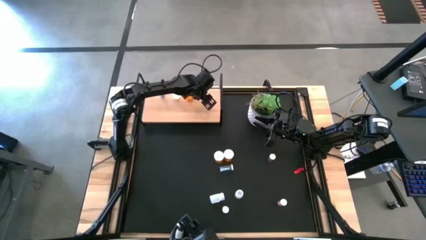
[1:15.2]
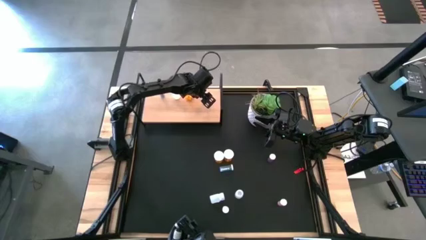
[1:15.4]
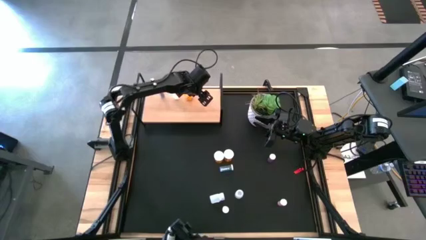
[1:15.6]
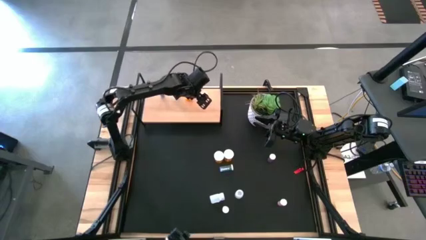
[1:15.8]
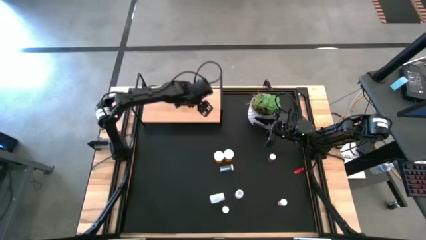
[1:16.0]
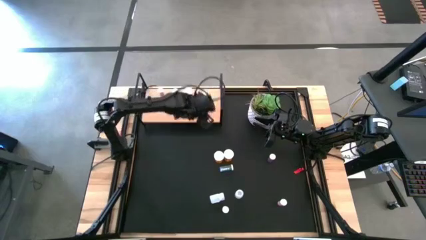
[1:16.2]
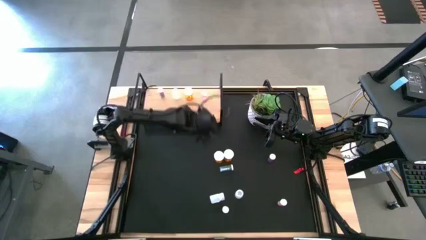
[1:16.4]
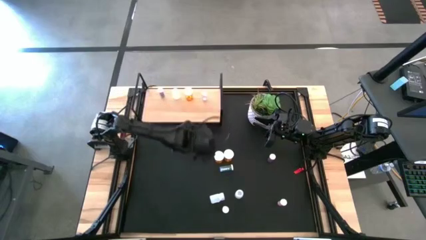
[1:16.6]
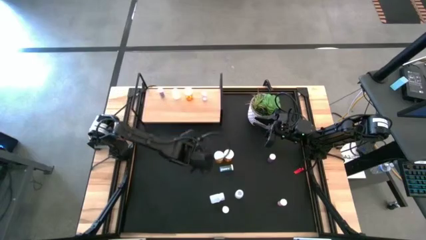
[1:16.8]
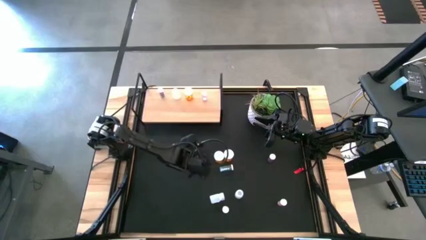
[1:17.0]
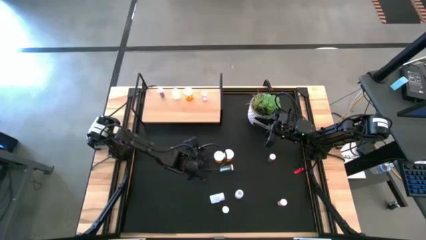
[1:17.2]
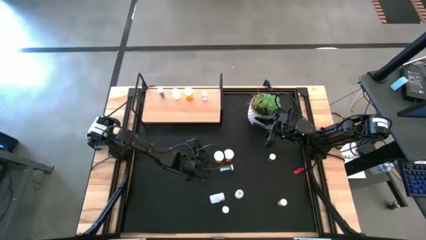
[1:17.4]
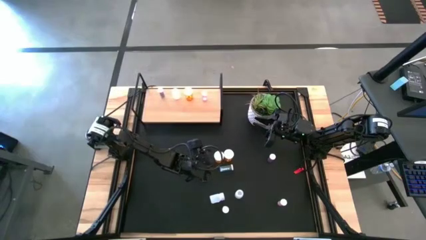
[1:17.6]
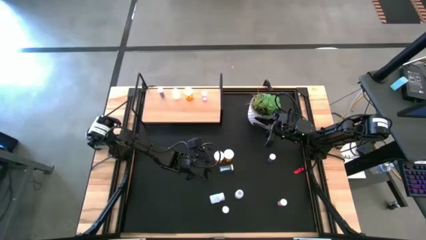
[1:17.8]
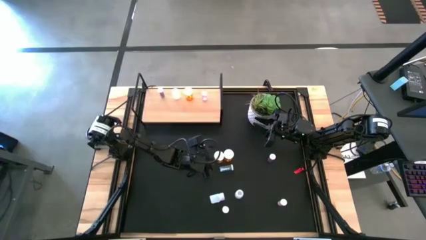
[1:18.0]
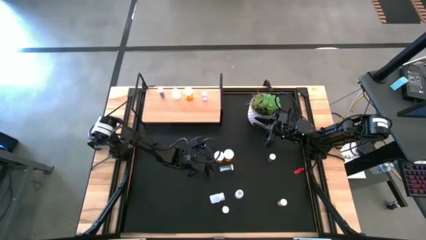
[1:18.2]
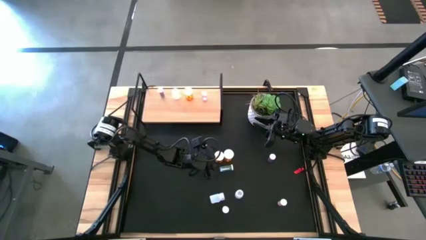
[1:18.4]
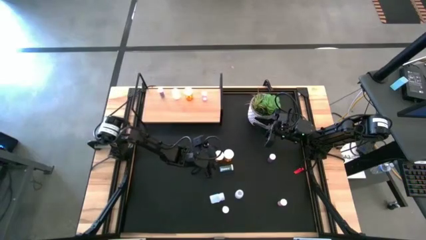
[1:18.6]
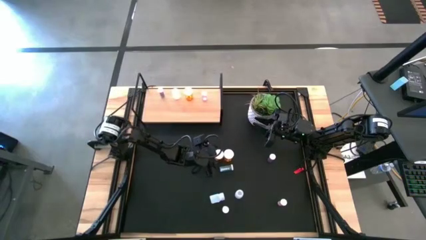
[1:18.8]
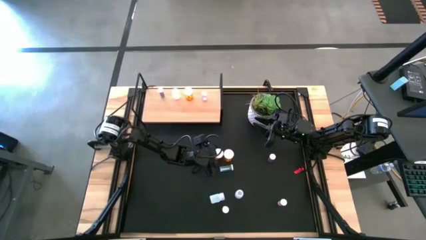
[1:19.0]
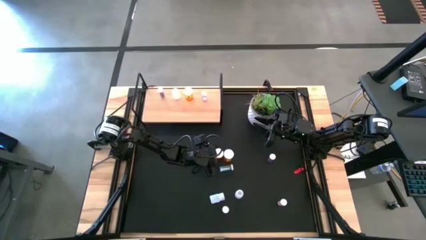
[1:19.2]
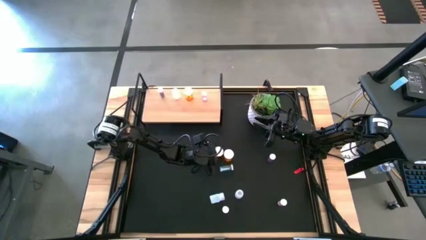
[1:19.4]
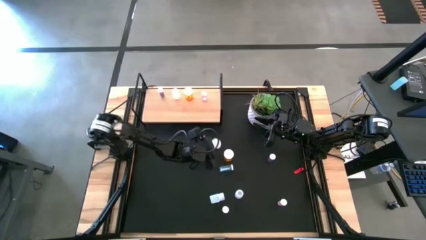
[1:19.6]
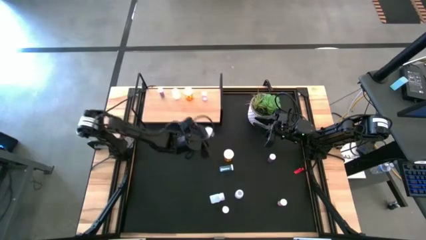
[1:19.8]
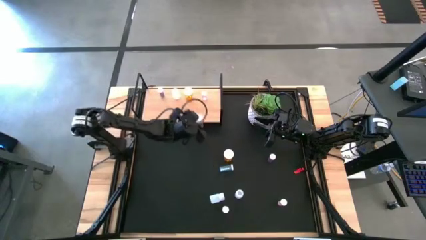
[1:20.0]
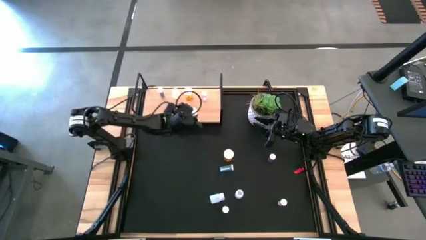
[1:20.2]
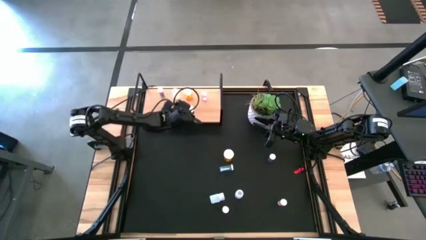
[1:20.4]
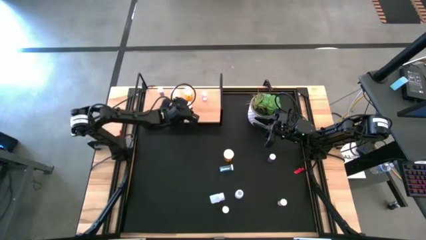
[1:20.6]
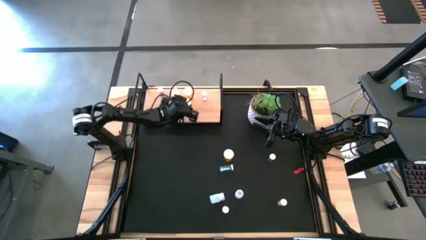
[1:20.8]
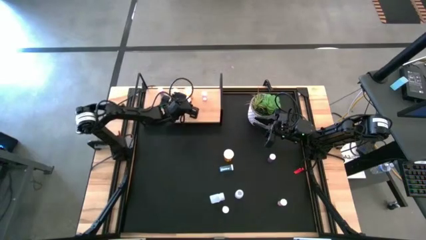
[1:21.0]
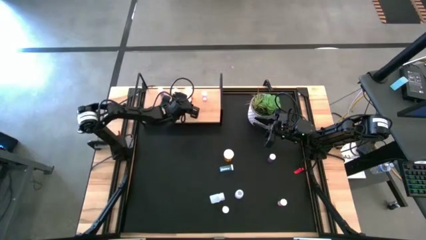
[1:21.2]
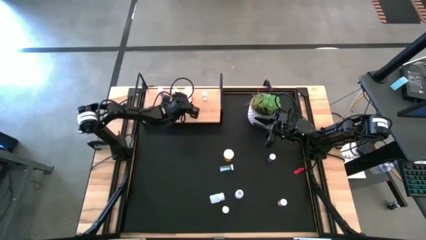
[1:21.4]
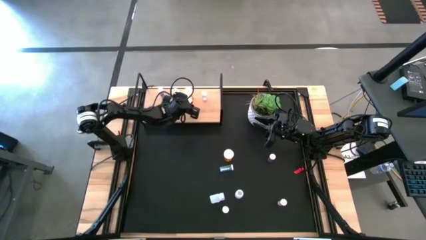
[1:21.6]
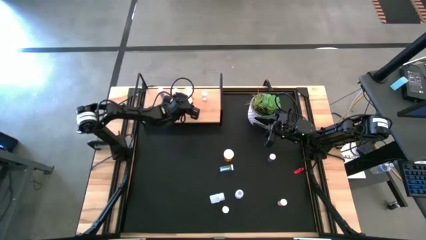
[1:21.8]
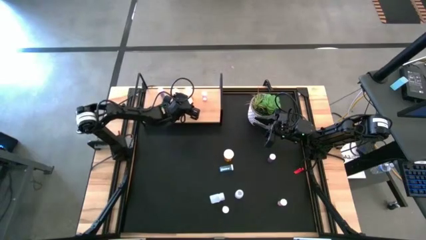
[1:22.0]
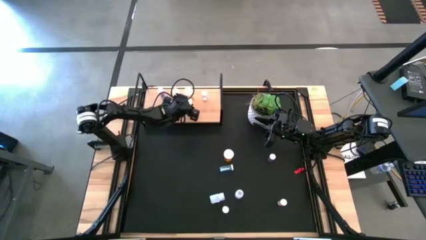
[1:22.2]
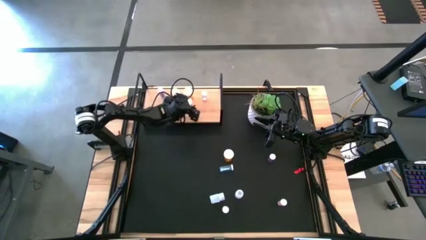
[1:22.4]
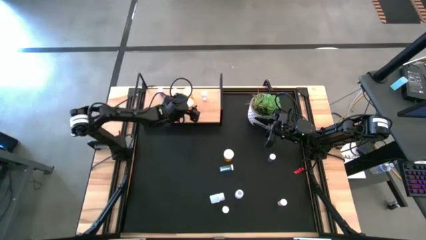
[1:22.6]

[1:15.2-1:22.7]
Task: Pick and place medicine bottles onto shelf by color
Put the top left orange pill bottle on the shelf aligned with the other orange pill bottle

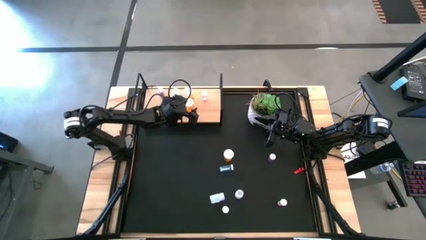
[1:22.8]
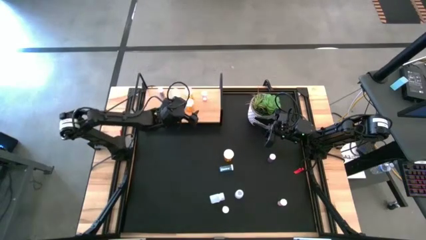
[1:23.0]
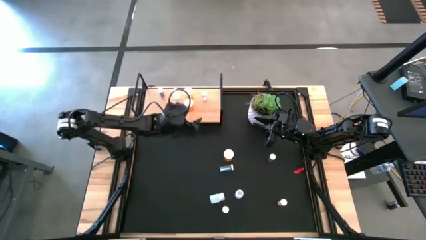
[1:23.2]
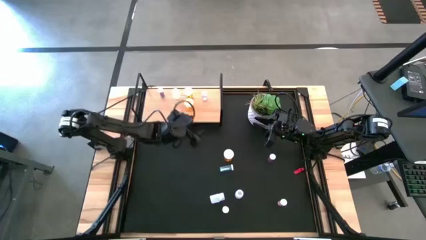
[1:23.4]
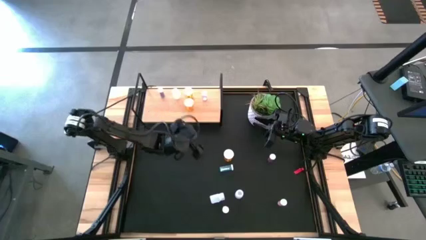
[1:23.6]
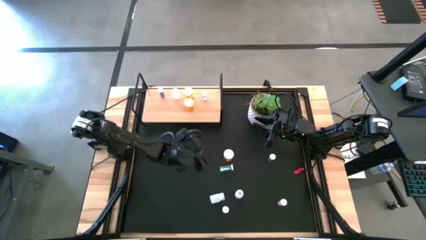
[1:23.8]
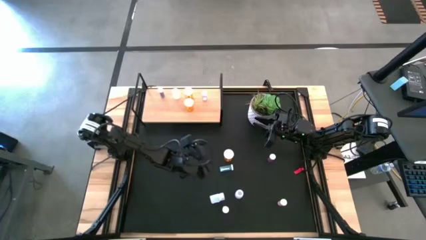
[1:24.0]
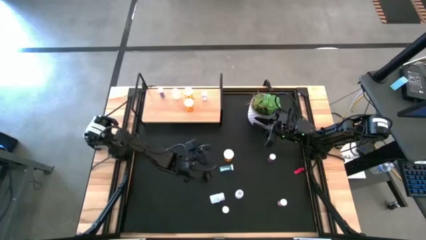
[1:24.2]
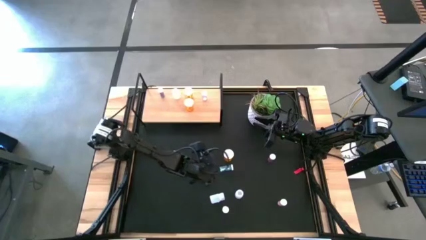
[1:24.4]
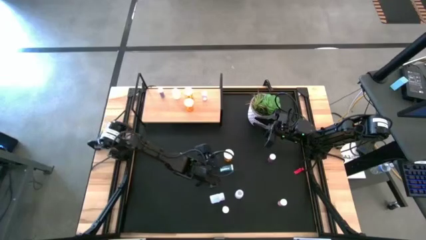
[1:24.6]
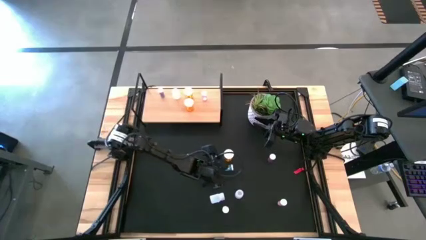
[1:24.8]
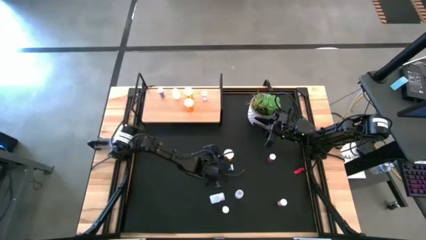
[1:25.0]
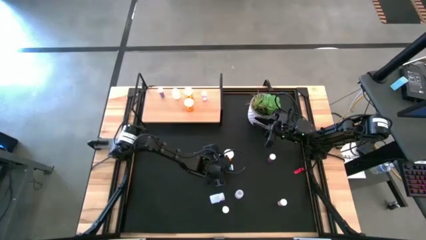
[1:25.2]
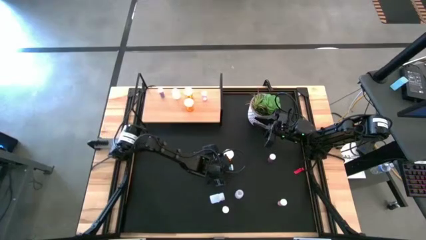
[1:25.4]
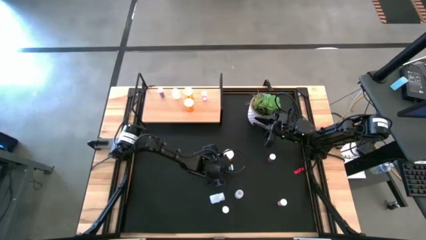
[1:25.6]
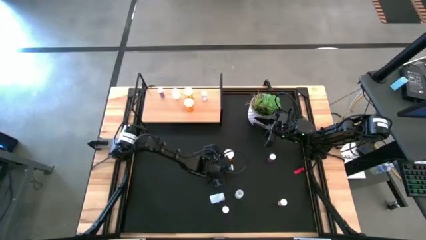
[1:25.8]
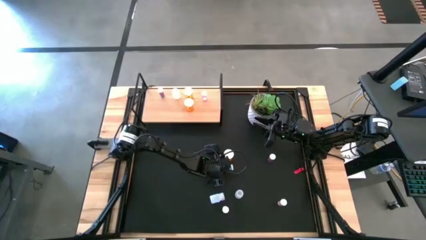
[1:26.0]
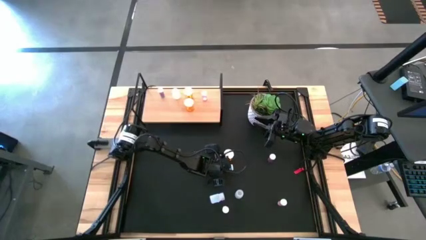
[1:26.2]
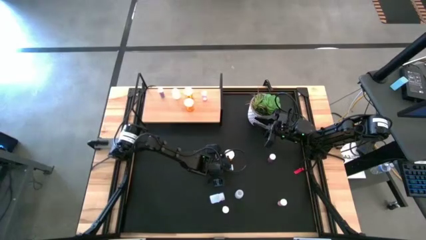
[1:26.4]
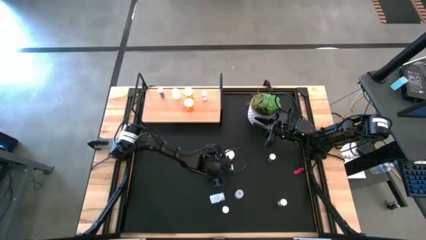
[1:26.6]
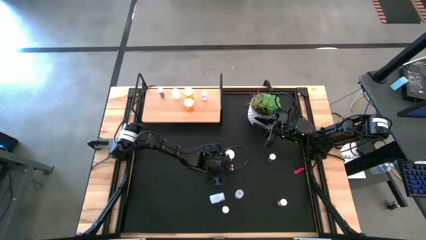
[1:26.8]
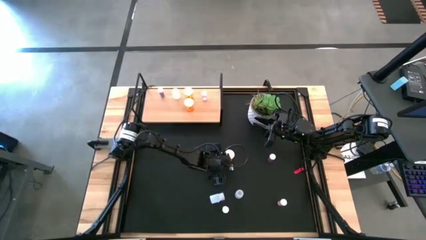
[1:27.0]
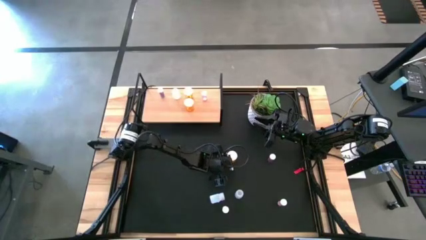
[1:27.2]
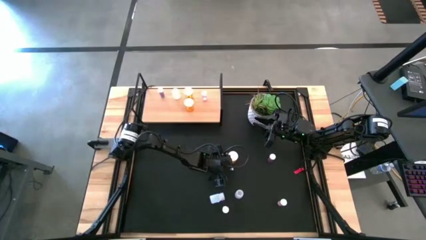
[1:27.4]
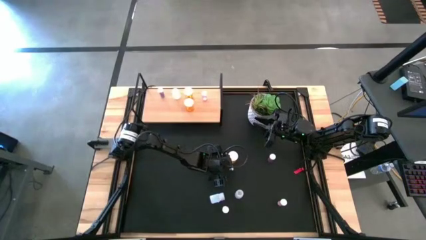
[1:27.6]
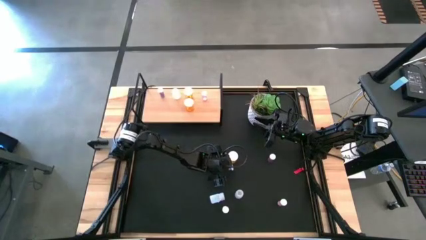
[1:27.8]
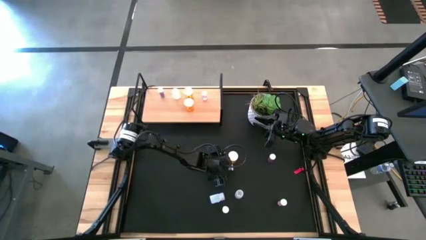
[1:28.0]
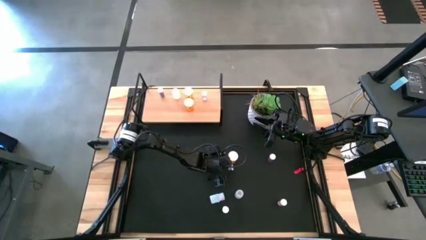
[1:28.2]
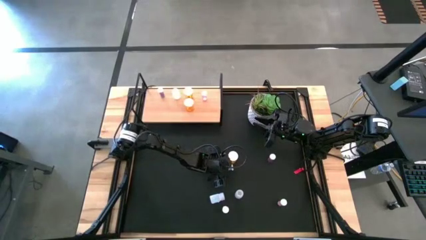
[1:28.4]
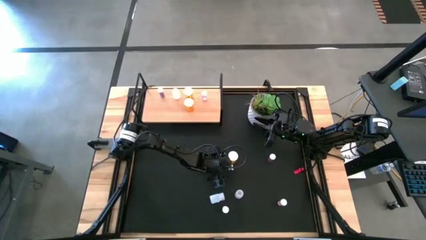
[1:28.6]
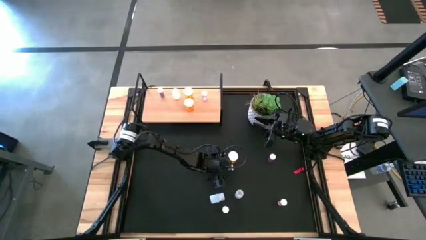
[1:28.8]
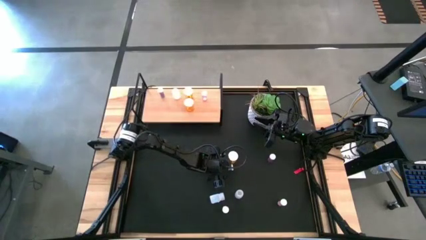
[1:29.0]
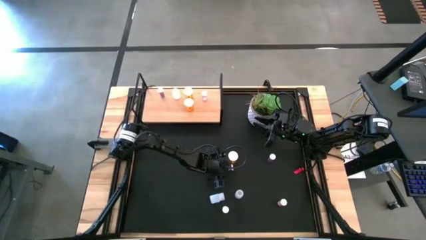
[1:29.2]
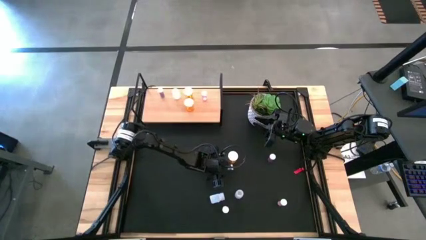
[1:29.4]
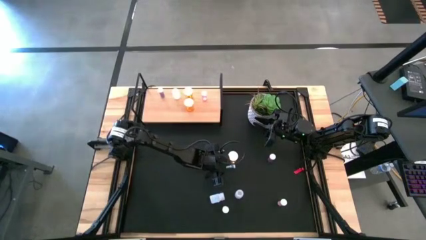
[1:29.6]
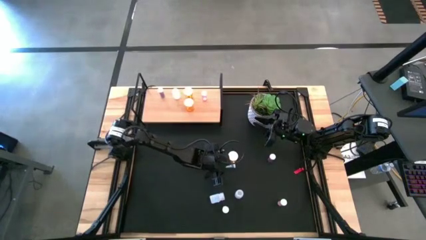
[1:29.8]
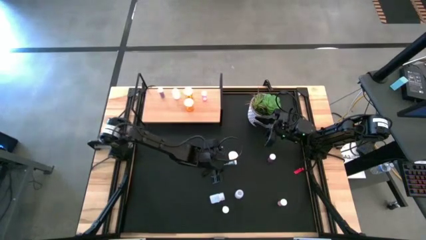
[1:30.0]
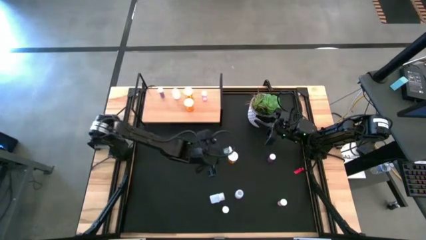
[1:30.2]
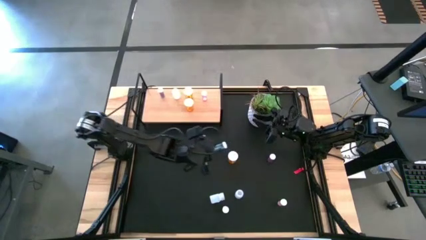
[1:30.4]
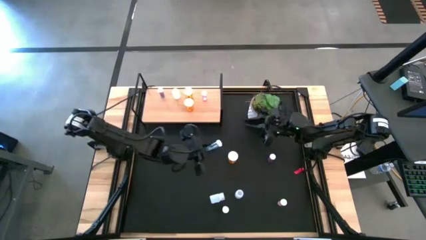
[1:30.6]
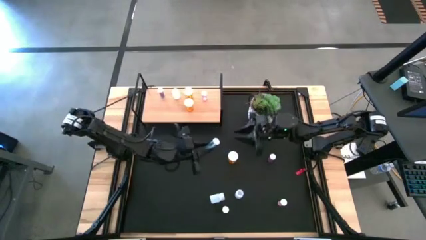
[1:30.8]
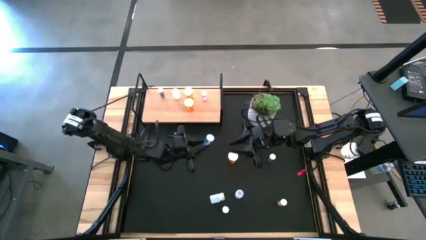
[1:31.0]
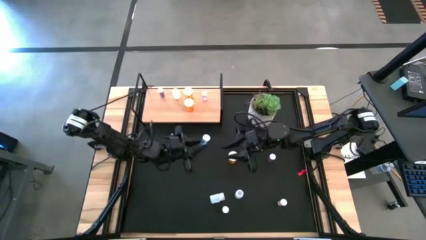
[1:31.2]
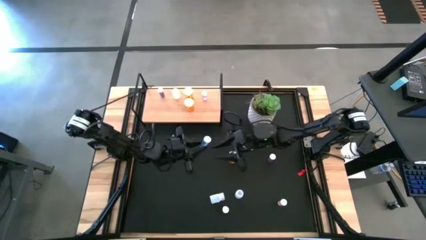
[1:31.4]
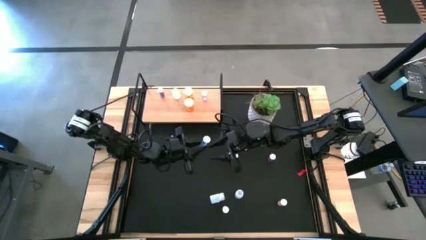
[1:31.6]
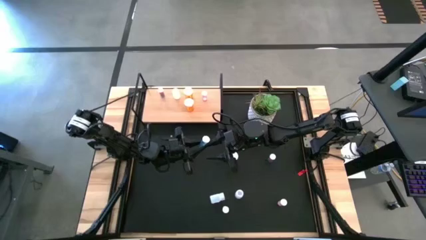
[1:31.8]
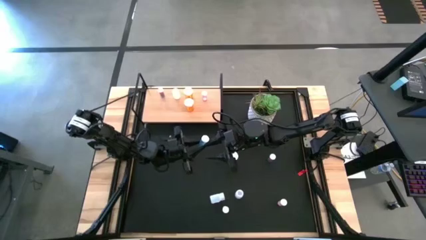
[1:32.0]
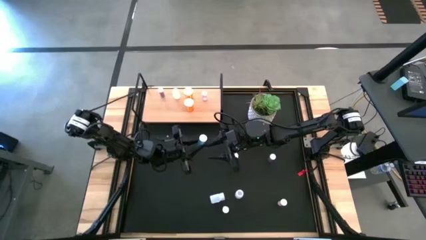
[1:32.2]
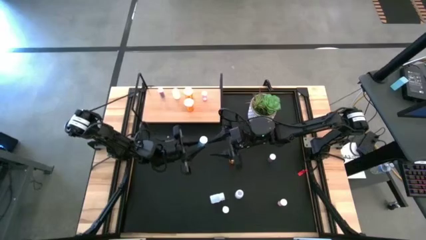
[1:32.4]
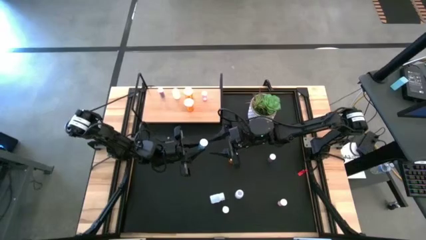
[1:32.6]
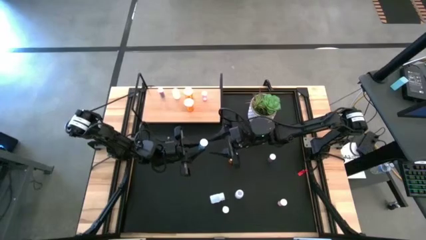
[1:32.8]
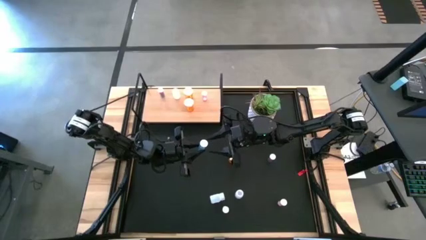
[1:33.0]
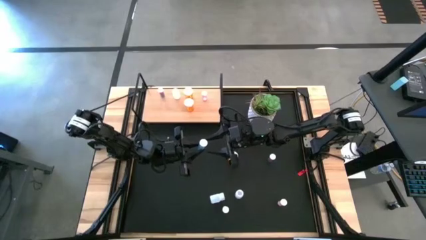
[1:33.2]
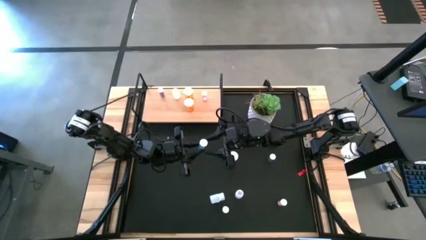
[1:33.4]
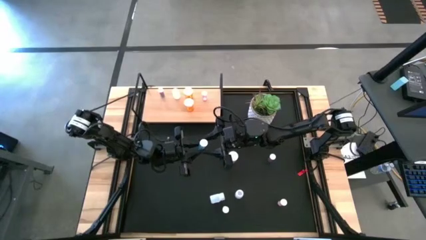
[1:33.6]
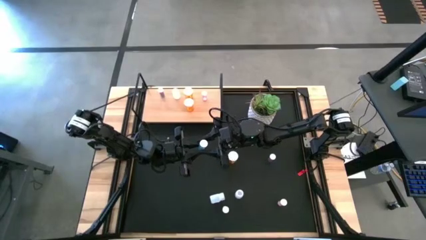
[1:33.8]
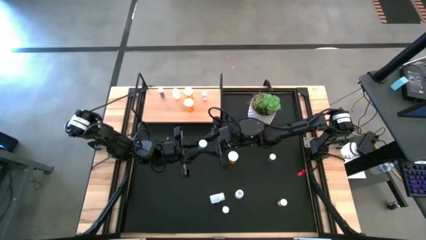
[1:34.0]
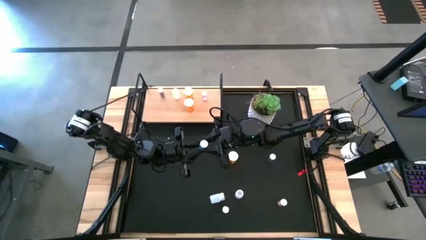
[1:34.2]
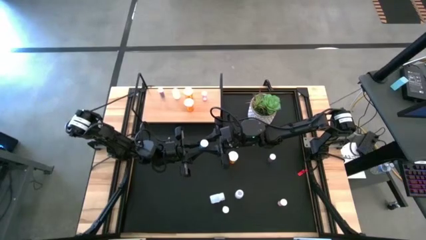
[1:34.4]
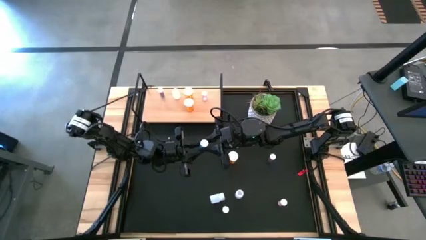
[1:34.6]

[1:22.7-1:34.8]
Put the left blue pill bottle on the shelf aligned with the other blue pill bottle
